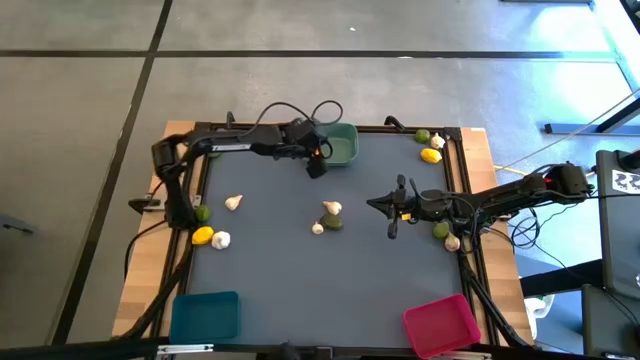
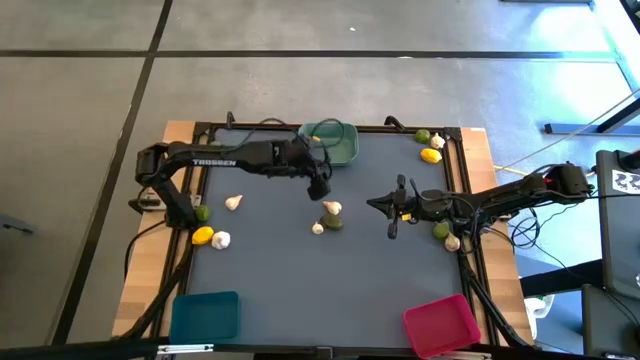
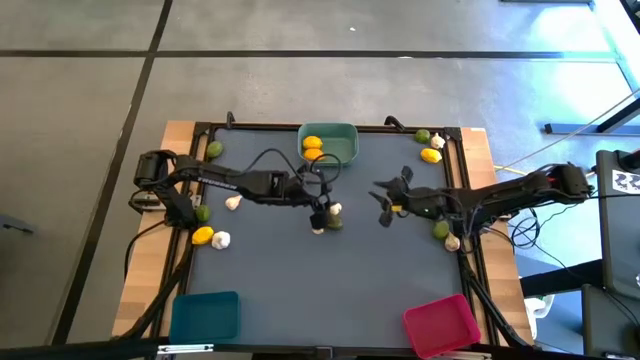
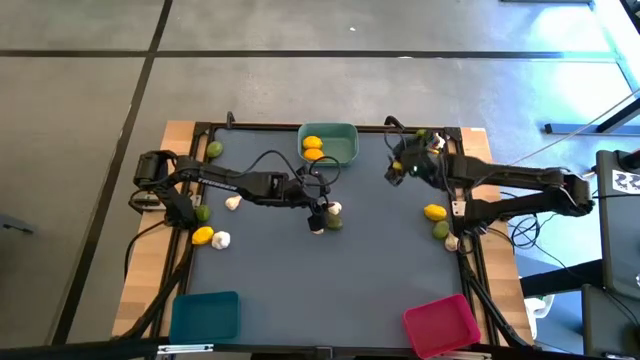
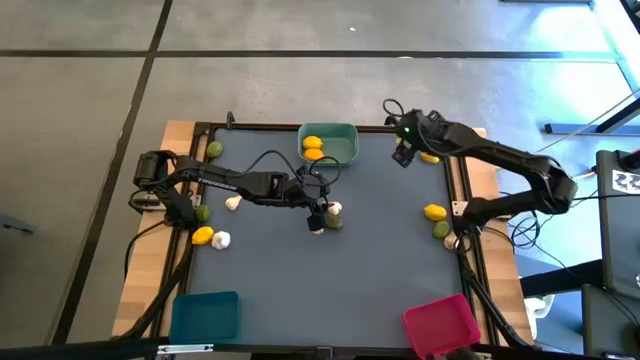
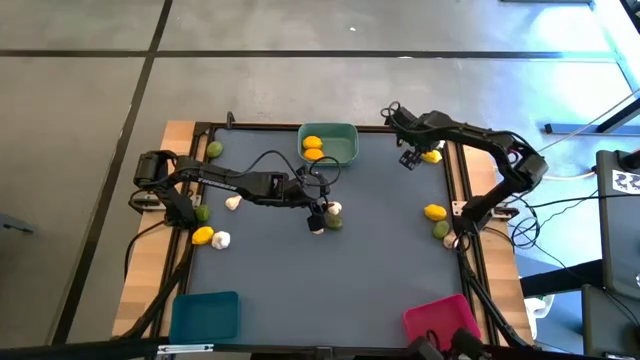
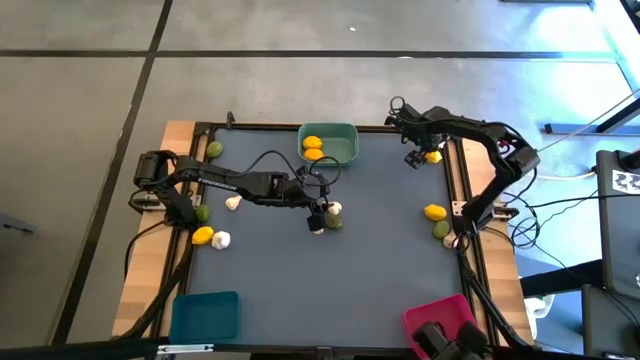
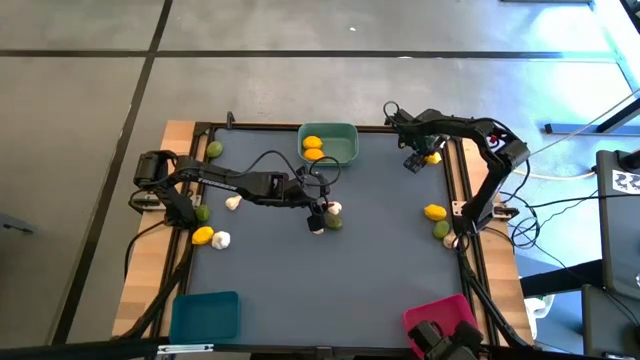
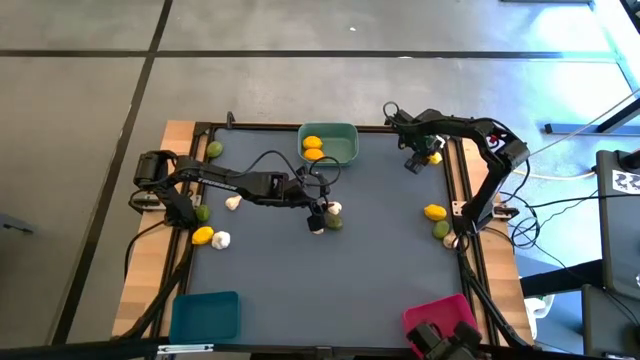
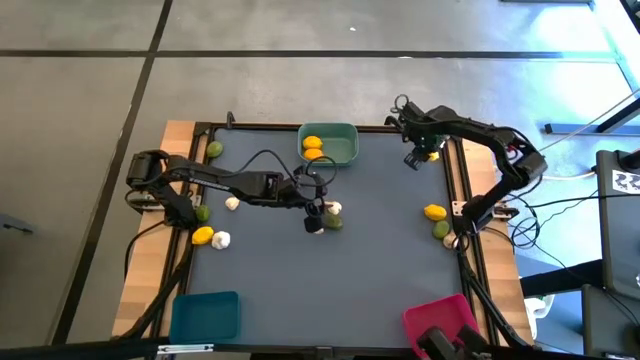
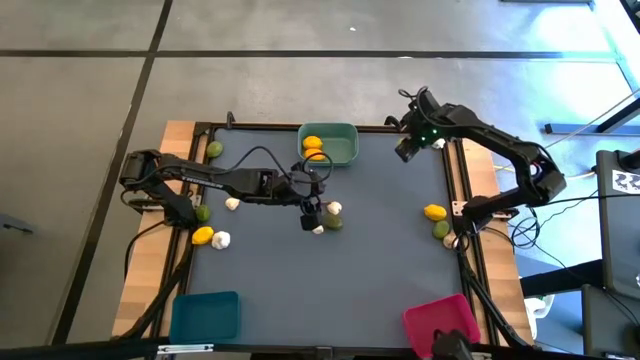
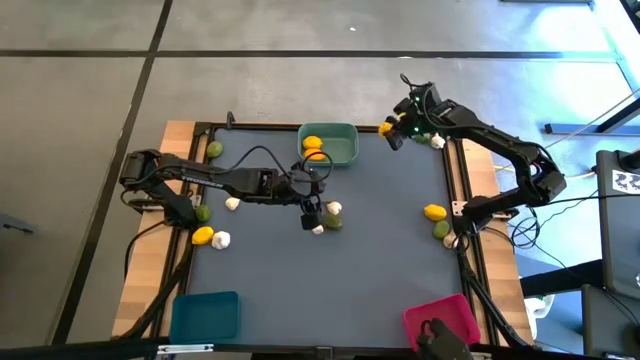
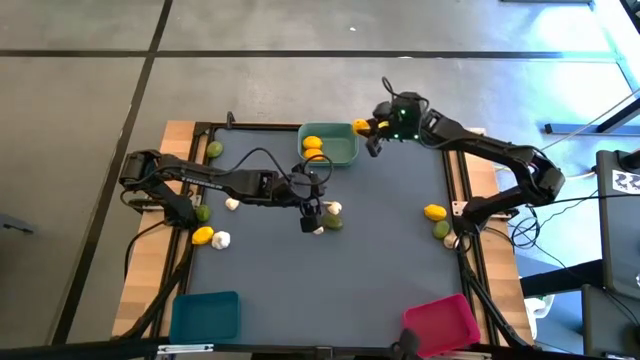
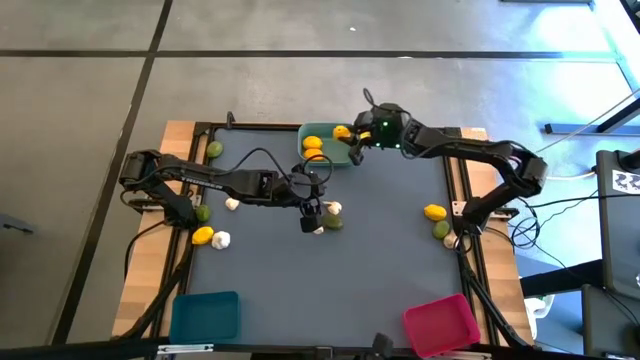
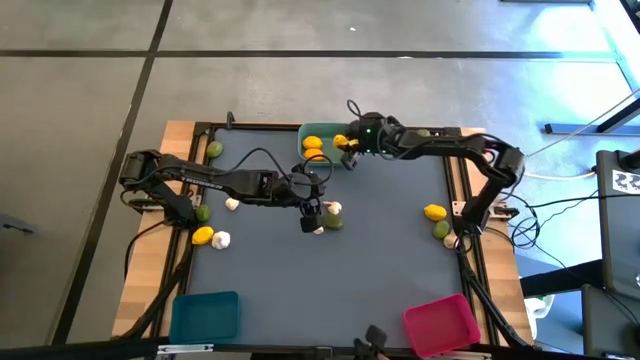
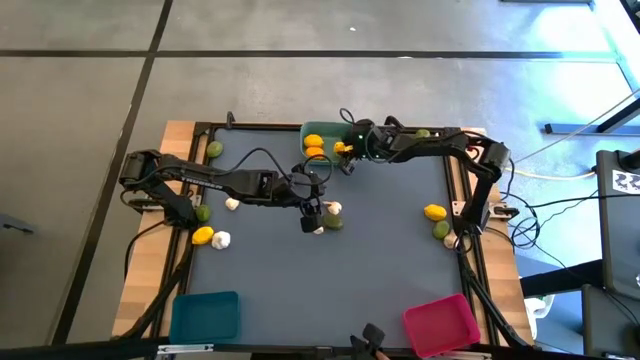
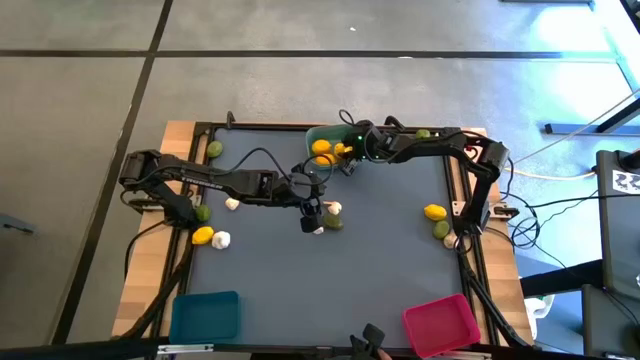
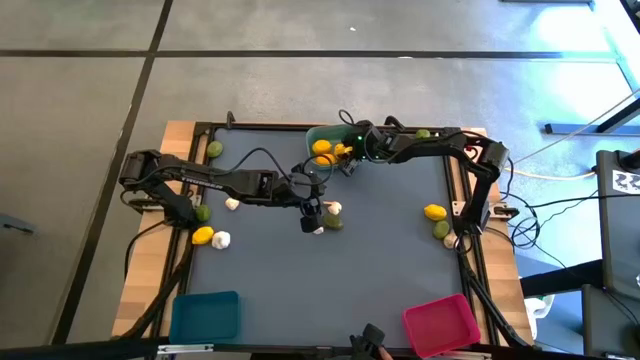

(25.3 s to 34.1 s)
Task: Sort produce into baskets
Put the green lemon into the green bin

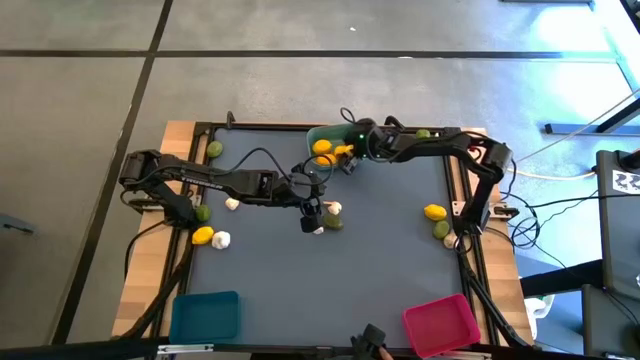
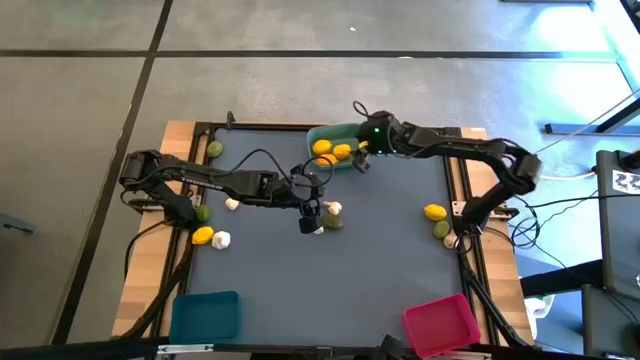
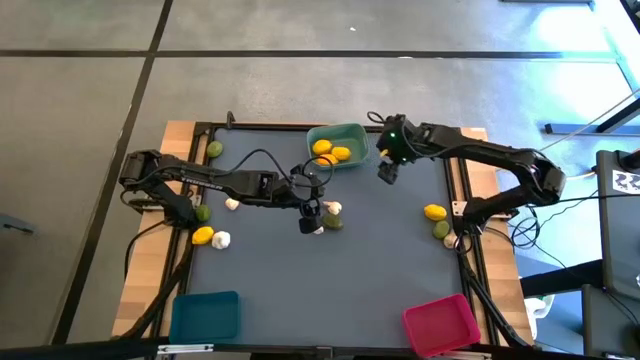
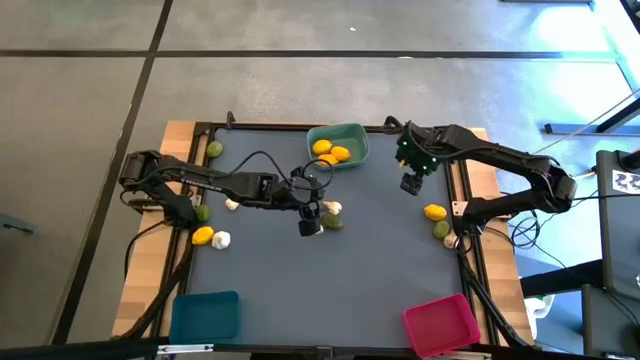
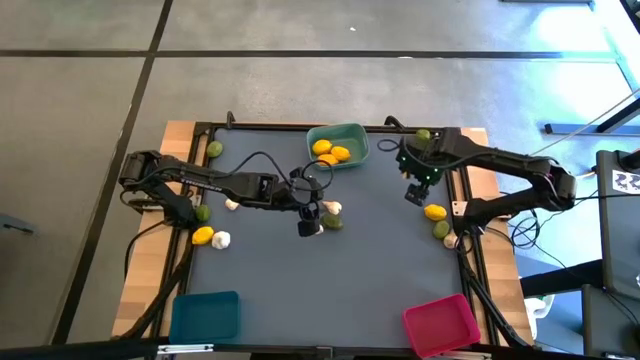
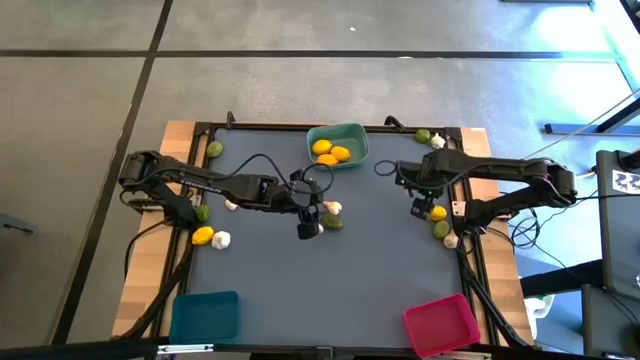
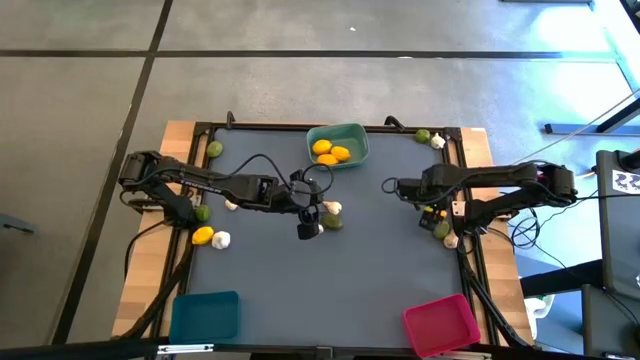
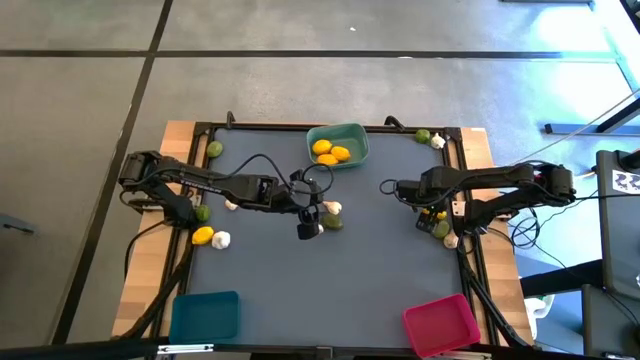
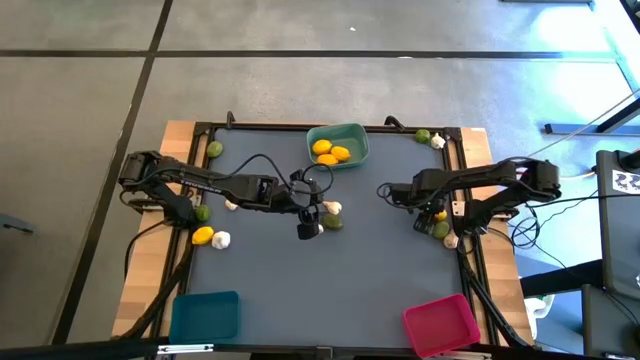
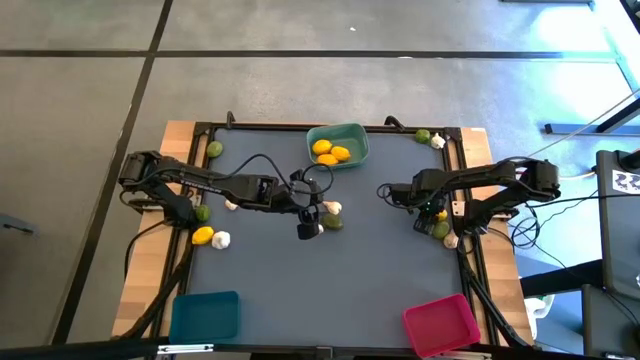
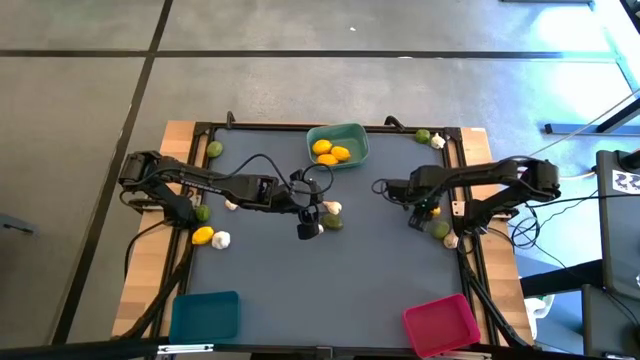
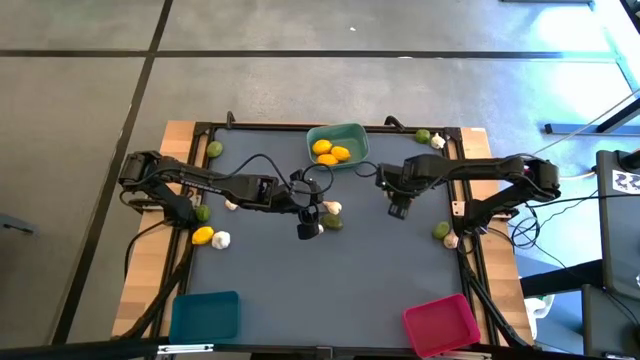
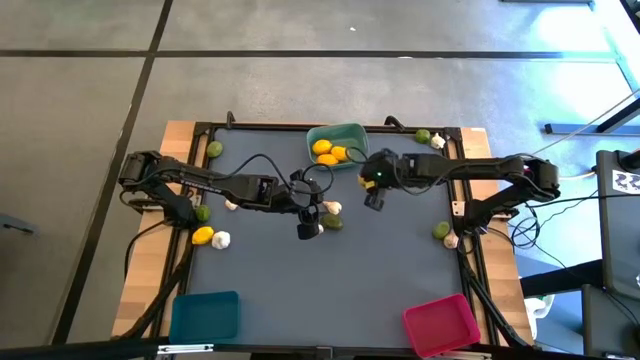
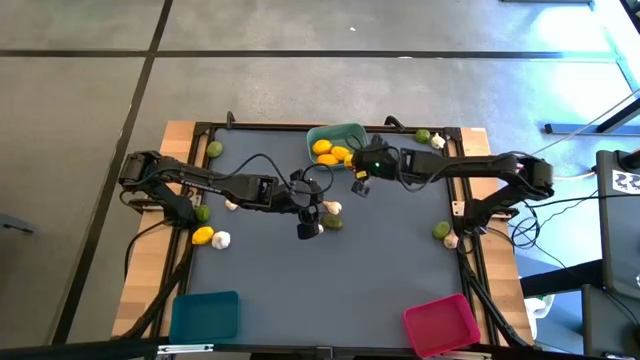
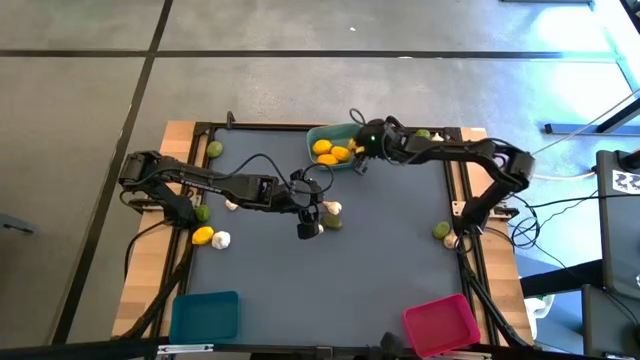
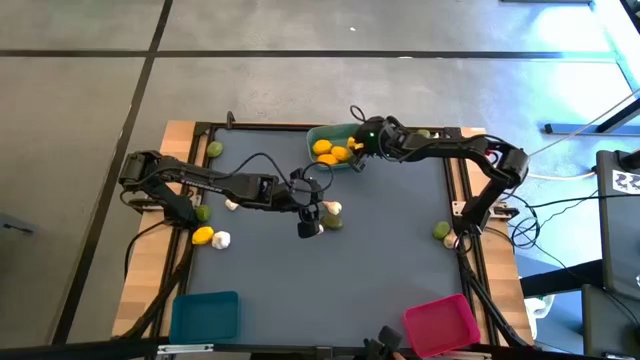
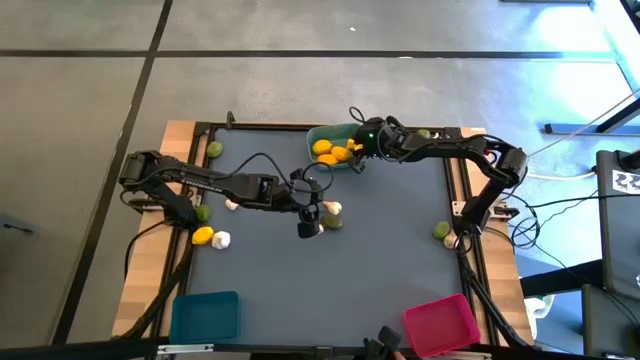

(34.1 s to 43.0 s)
Put the green lemon into the green bin

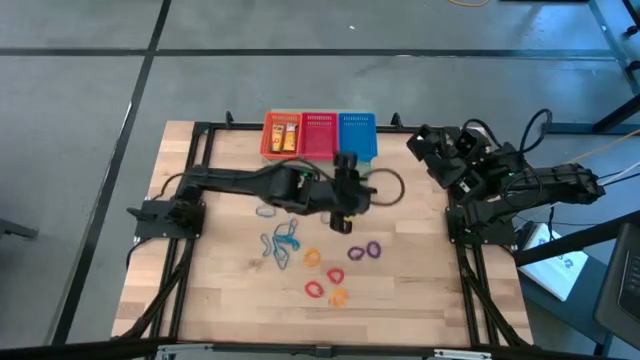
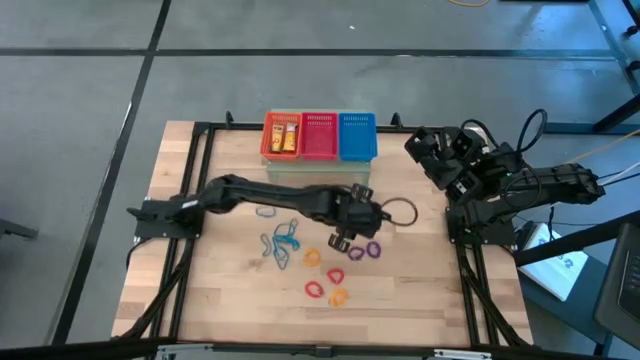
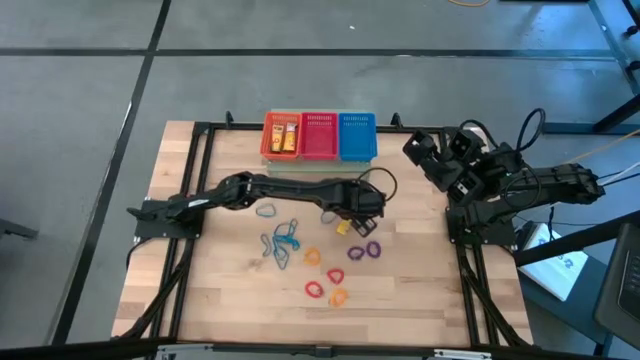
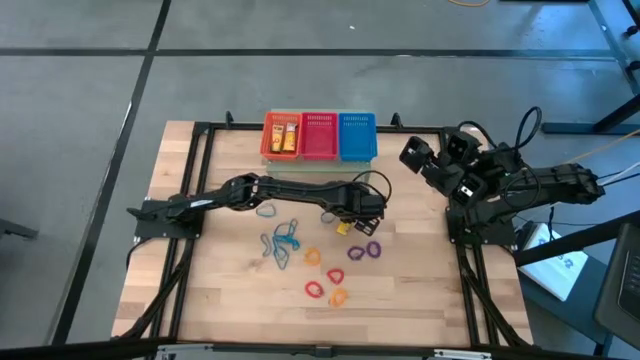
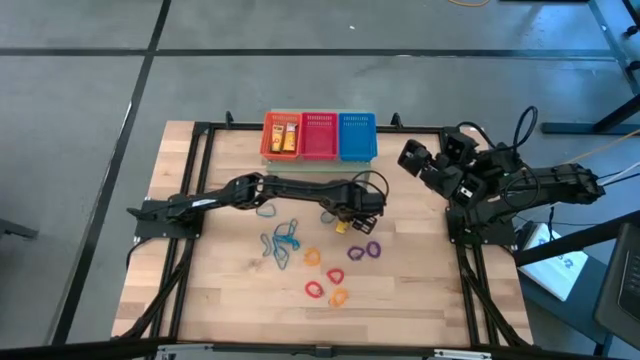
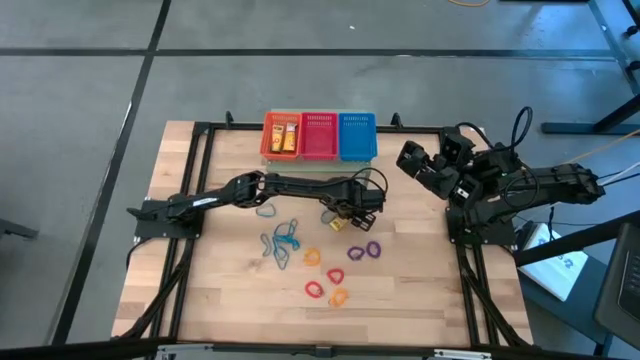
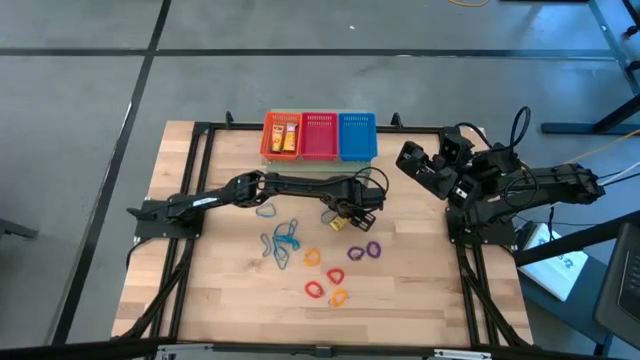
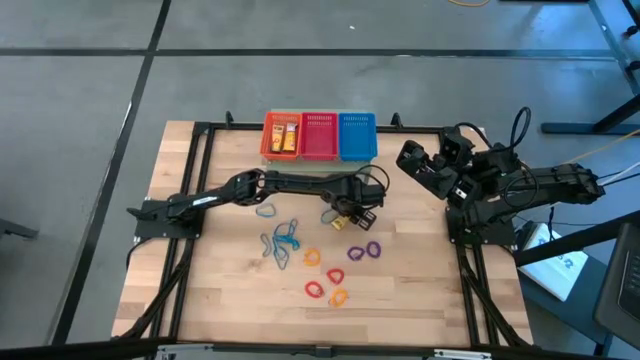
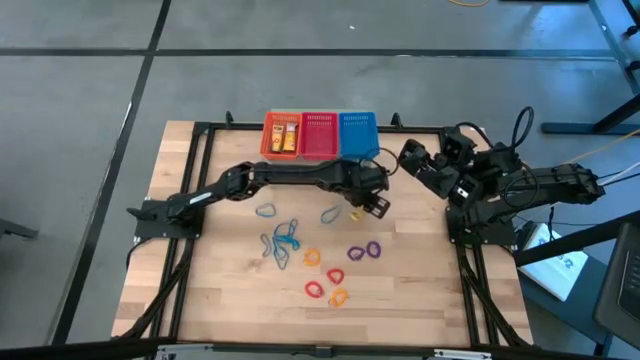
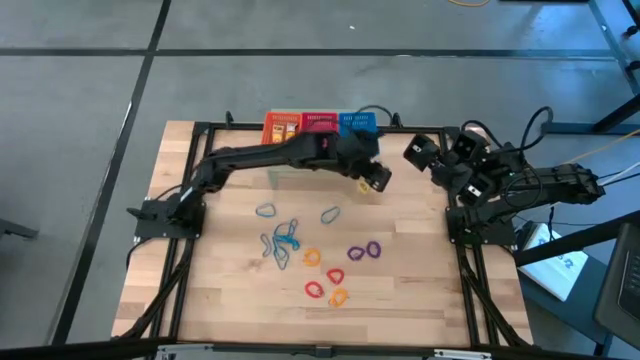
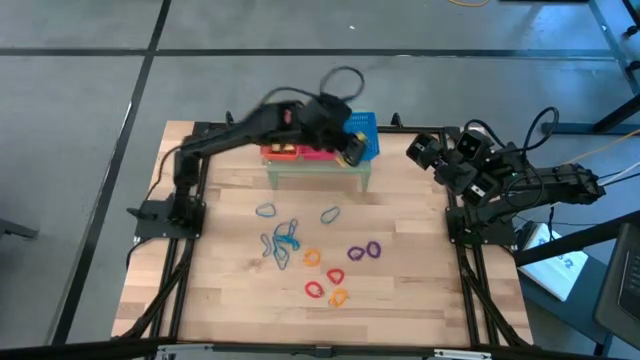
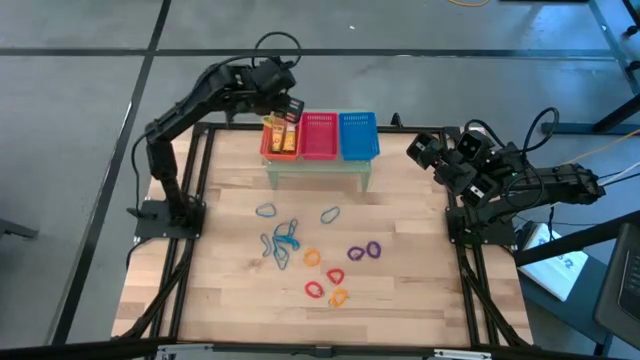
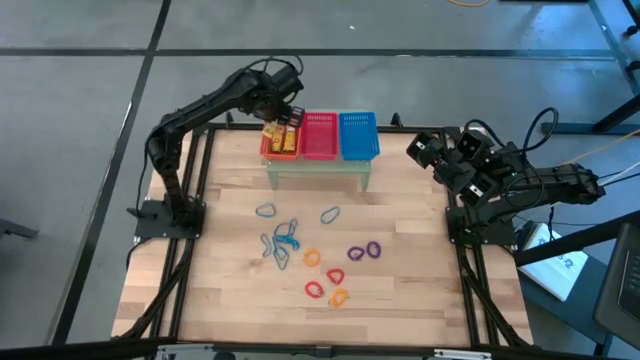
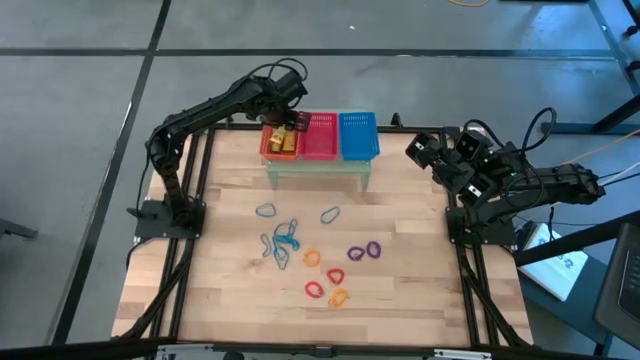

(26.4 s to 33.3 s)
Task: Pick & Place Office Desk Supplies
Put the yellow box of crayon into the orange bin on the shelf
